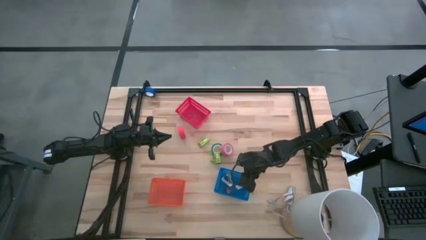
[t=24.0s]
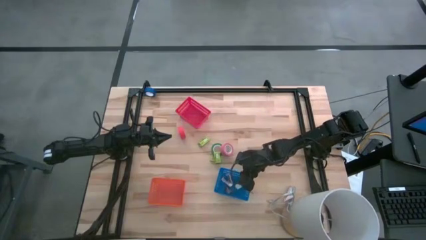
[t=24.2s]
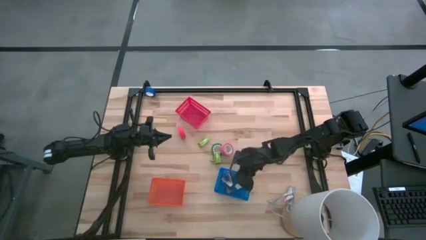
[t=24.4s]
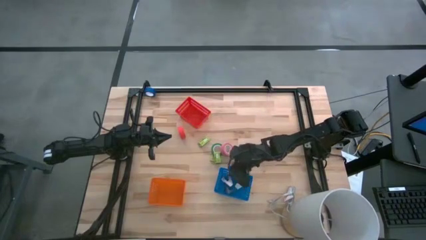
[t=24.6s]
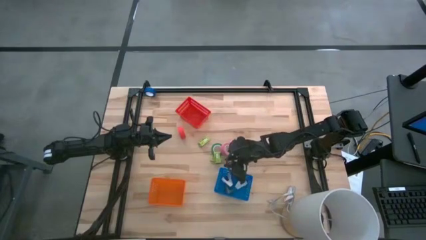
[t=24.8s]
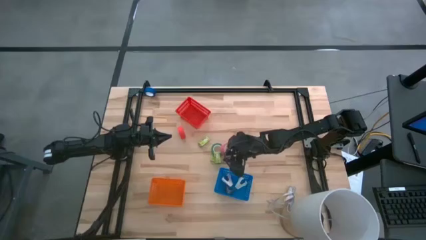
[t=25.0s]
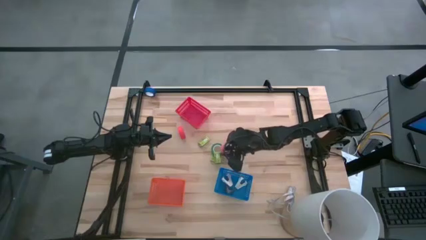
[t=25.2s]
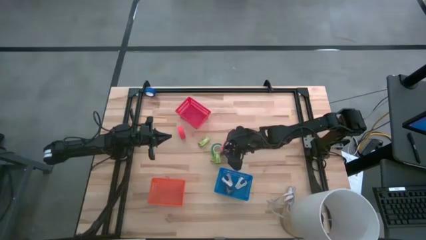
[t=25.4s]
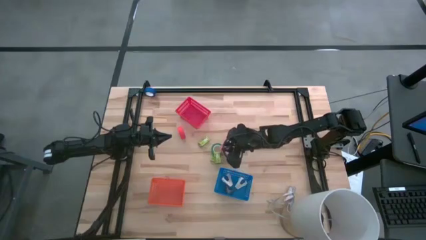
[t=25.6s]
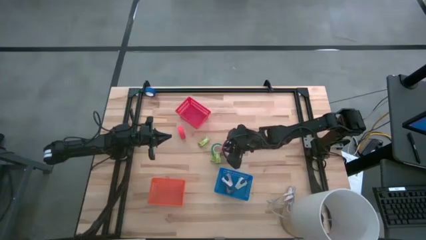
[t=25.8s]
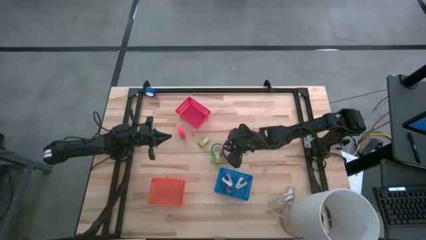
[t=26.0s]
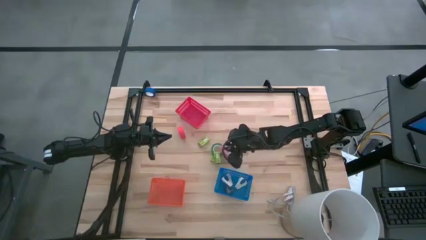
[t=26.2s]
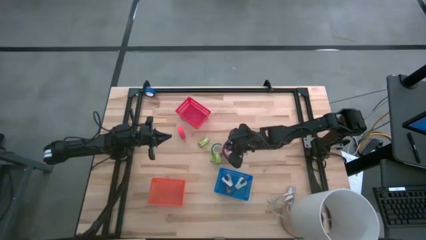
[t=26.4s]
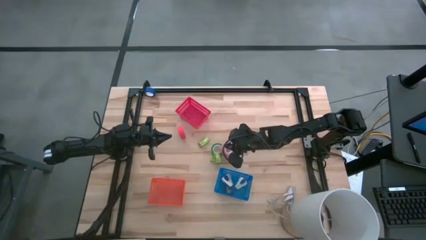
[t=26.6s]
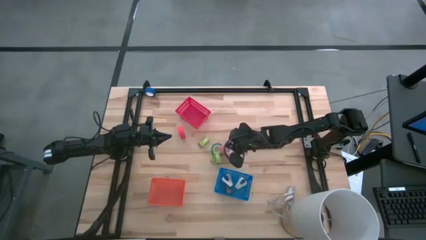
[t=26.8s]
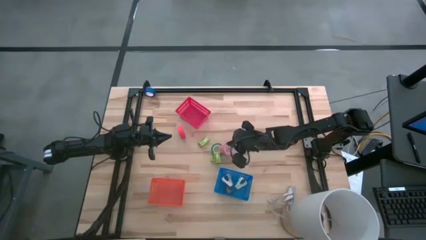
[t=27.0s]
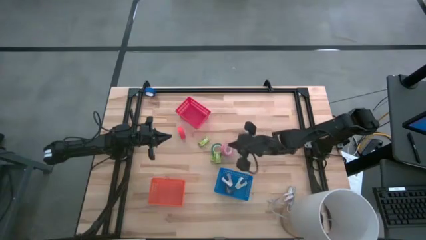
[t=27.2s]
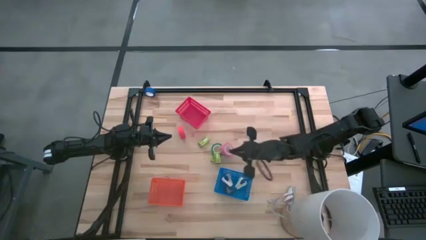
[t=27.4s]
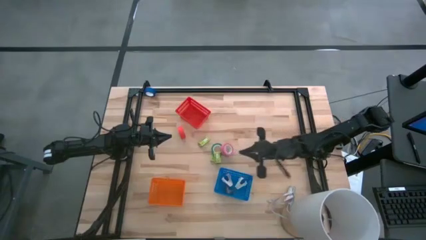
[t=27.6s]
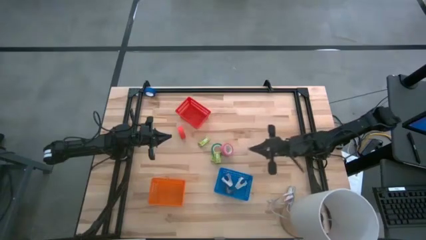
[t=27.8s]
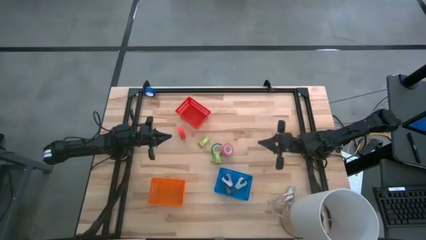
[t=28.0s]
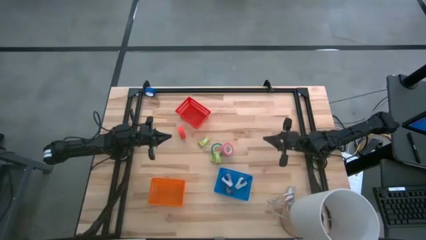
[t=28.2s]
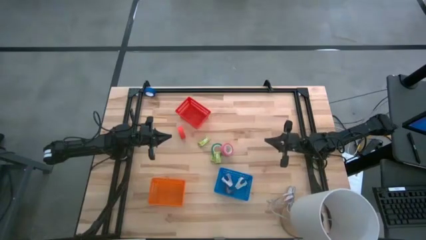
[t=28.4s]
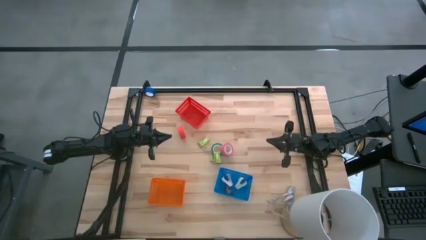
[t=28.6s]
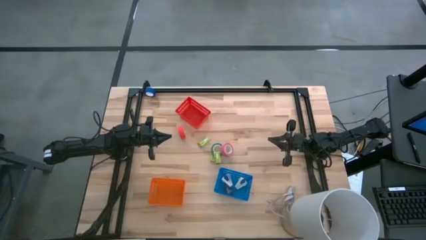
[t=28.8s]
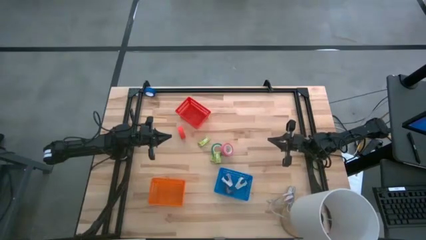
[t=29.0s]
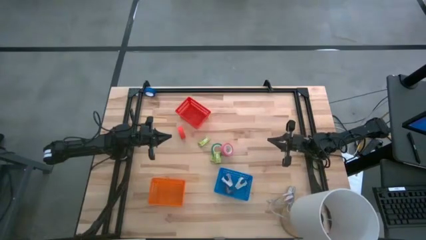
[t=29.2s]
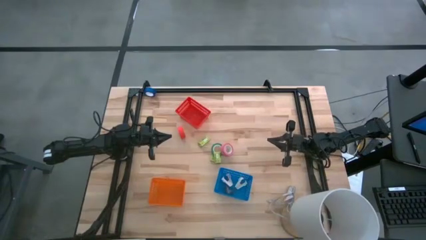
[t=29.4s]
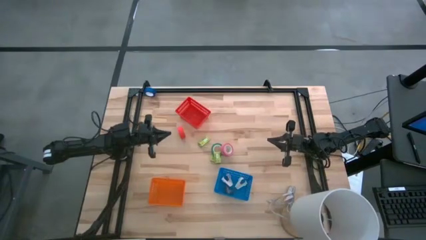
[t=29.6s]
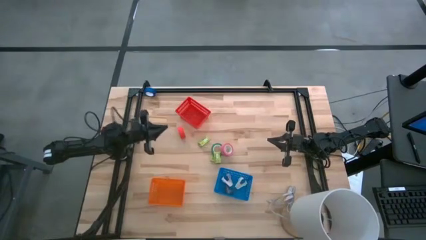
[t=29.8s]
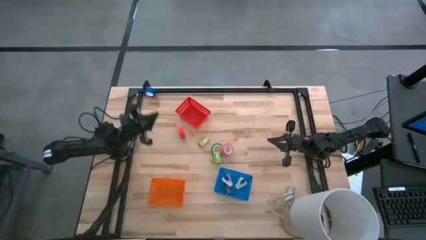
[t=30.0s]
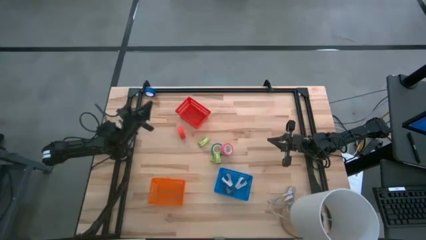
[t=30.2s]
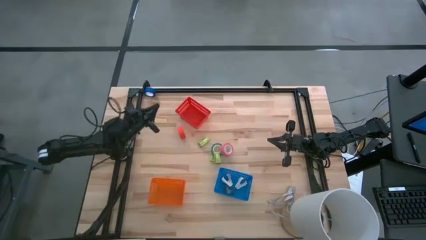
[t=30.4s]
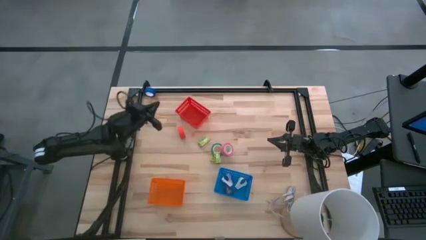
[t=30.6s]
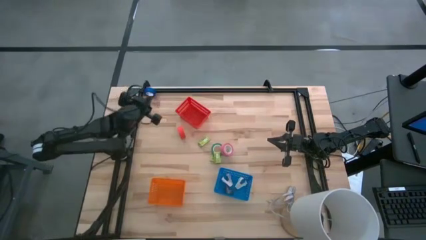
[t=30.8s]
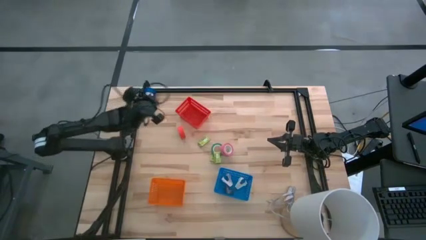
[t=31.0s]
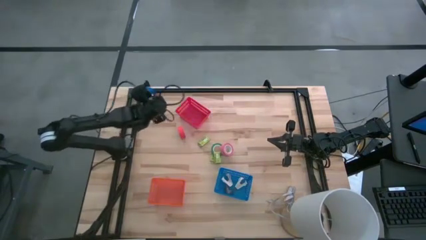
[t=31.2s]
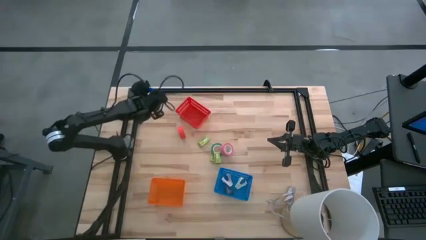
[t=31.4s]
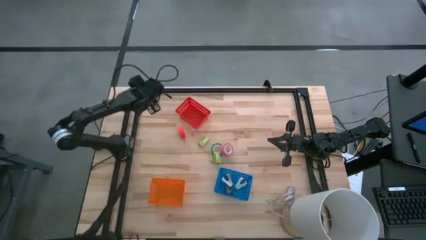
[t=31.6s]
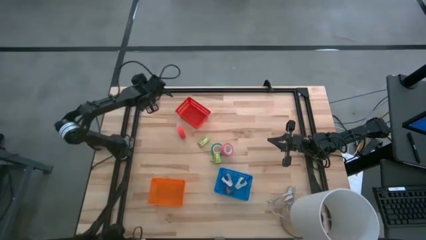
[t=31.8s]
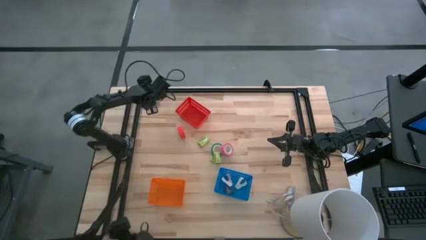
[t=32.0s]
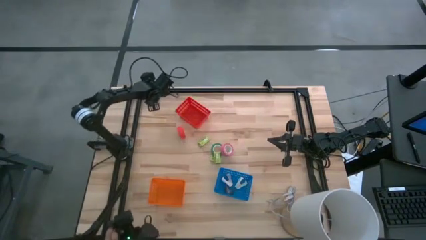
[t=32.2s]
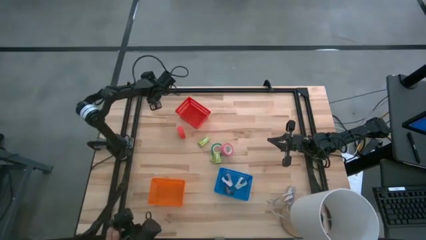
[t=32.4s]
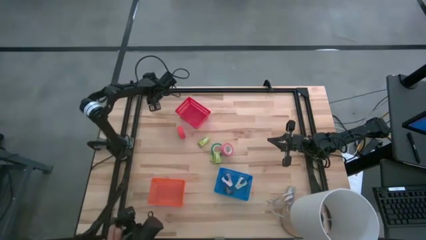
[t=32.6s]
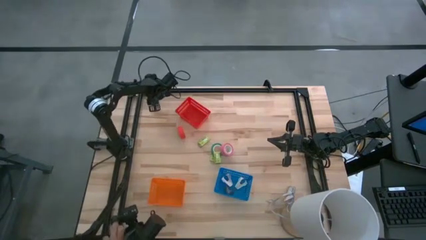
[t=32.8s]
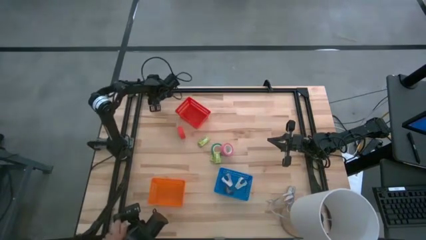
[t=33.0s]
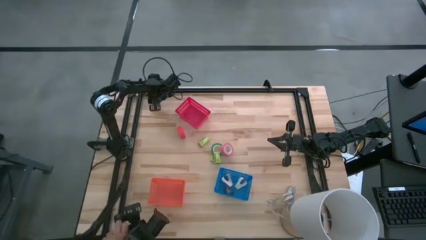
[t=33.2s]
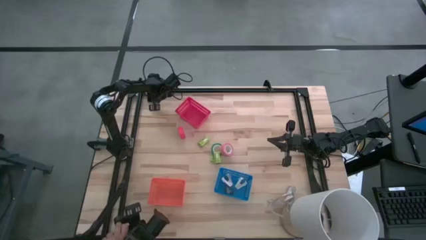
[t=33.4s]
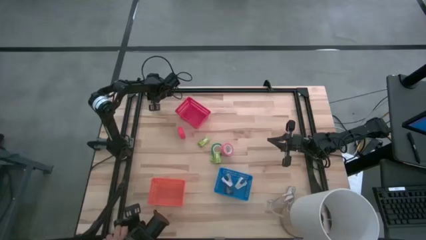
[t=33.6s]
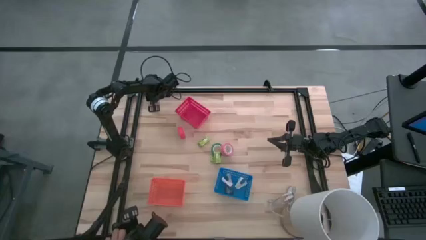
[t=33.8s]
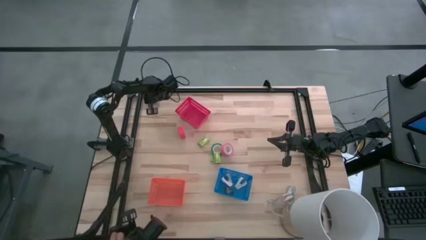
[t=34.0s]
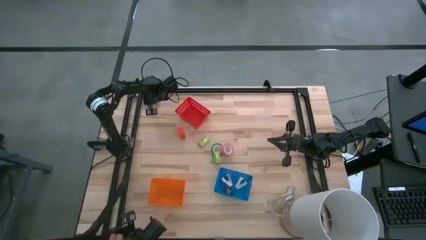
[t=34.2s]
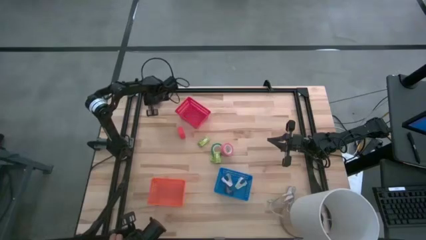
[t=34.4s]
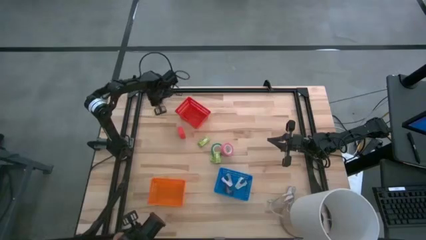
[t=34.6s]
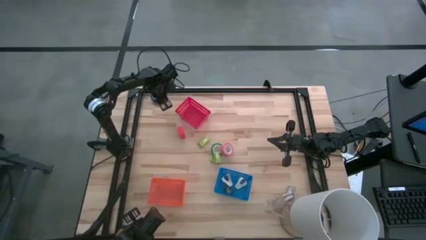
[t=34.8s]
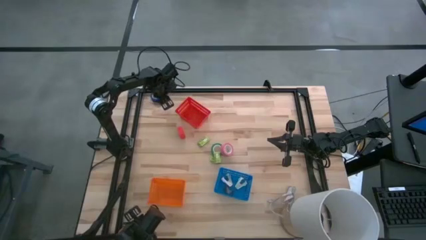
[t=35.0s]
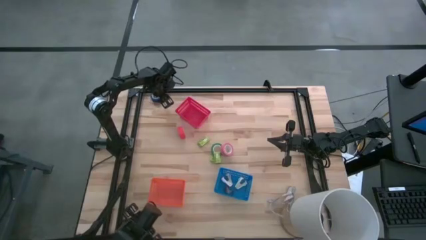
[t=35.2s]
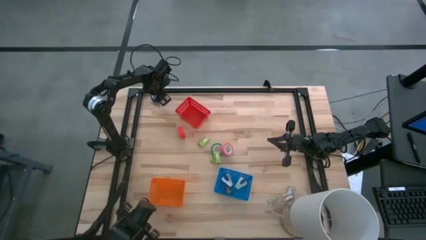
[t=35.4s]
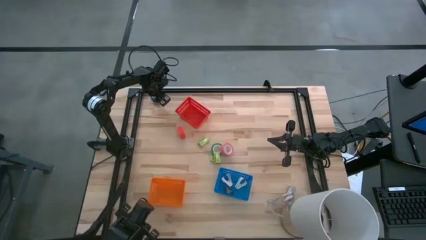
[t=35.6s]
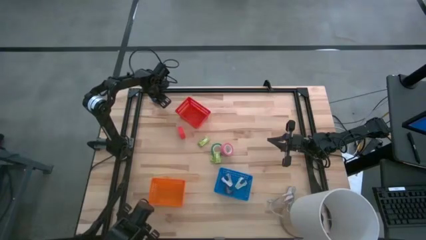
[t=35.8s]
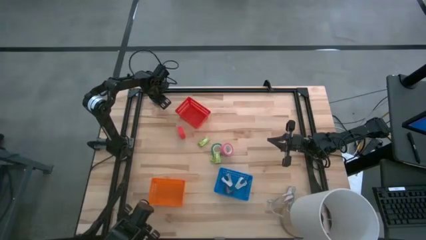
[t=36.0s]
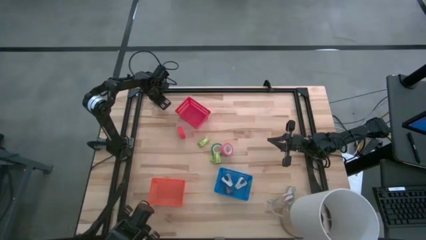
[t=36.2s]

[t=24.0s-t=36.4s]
Task: Pick and place Stapler, Stapler remover, tape
Put the blue tape into the red bin

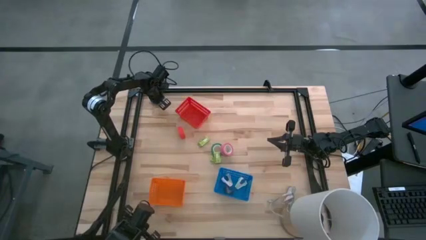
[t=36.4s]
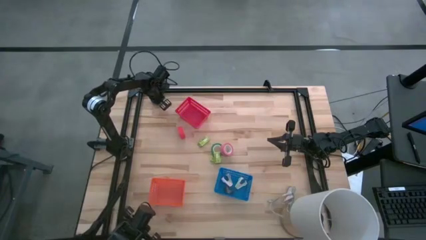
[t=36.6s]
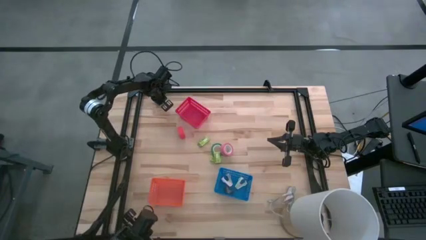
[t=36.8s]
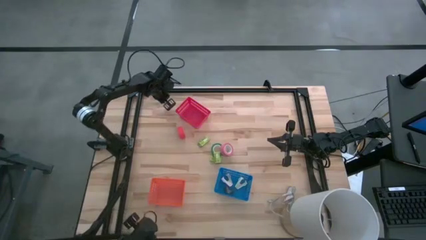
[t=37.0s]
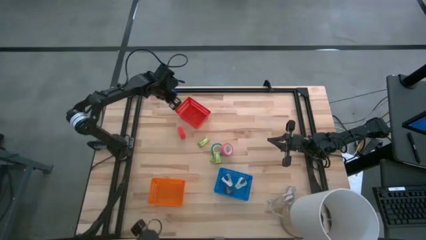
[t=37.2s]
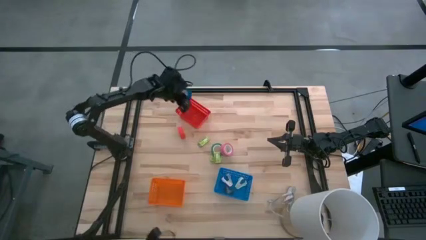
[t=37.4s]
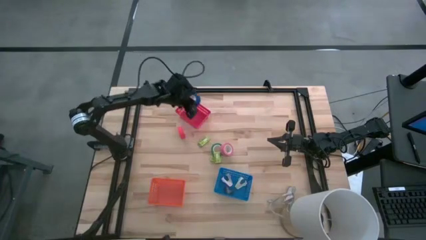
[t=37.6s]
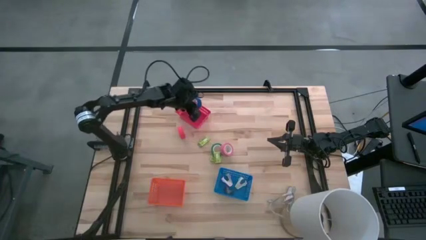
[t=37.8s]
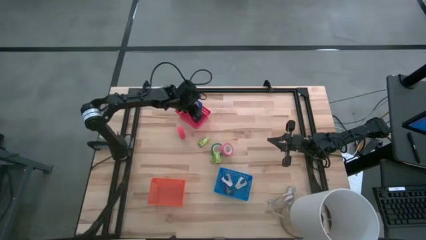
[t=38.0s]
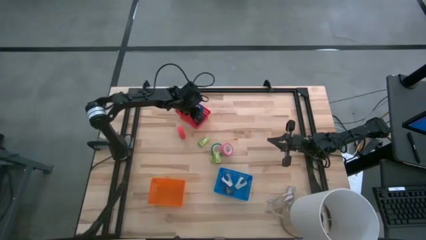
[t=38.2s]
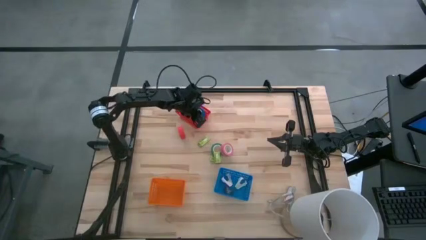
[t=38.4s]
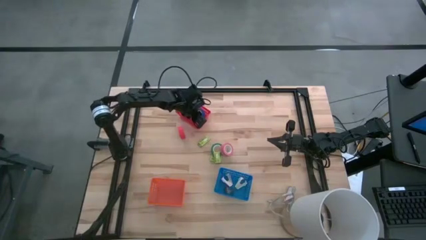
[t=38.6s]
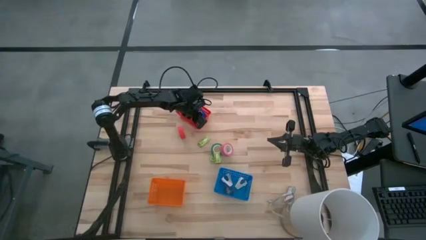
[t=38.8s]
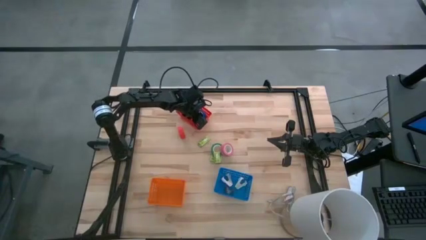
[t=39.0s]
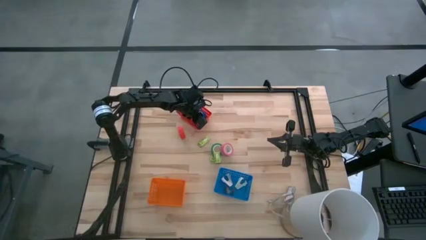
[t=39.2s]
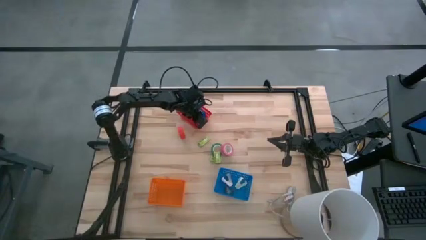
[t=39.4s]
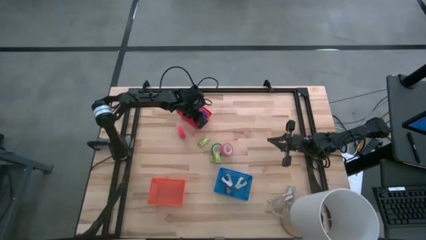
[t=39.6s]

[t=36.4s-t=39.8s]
Put the blue tape into the red bin
